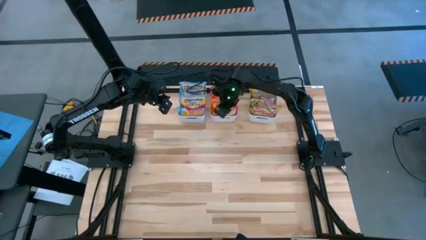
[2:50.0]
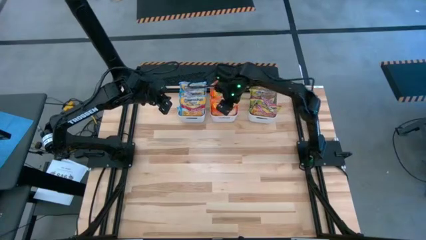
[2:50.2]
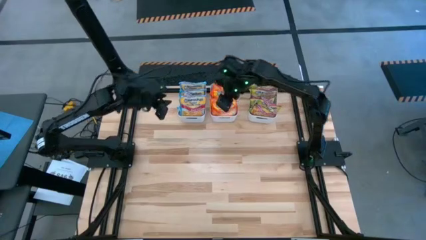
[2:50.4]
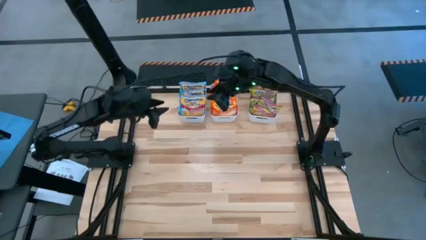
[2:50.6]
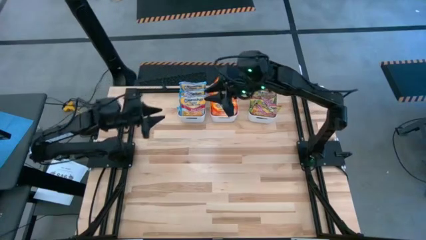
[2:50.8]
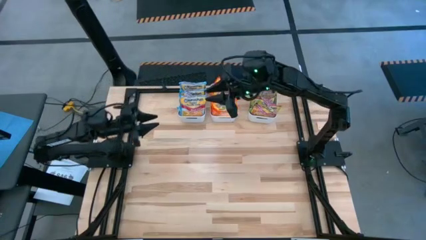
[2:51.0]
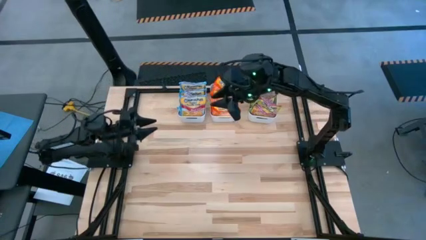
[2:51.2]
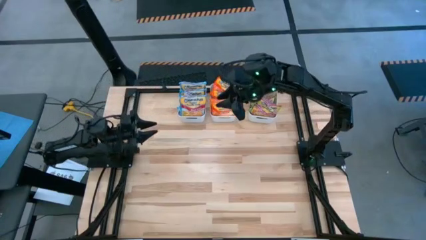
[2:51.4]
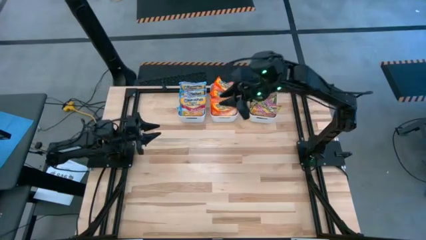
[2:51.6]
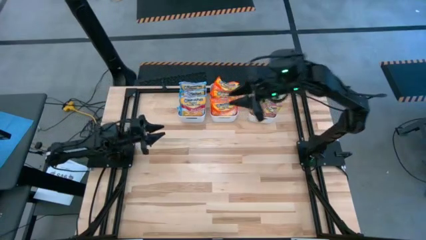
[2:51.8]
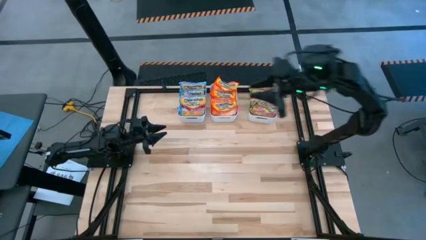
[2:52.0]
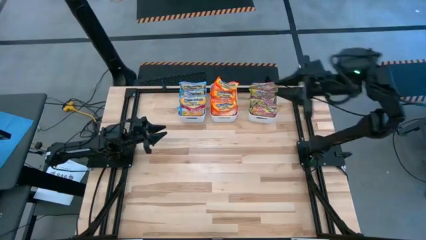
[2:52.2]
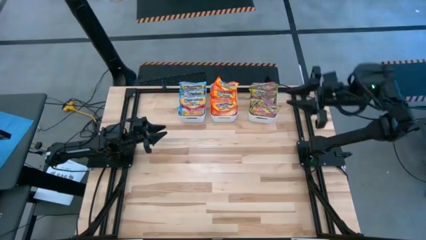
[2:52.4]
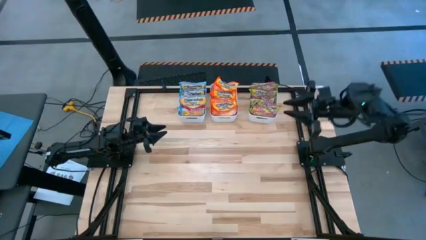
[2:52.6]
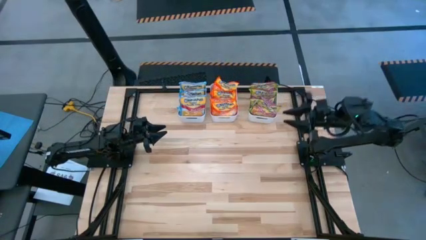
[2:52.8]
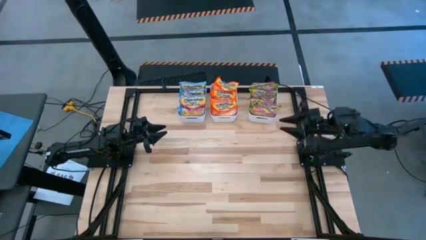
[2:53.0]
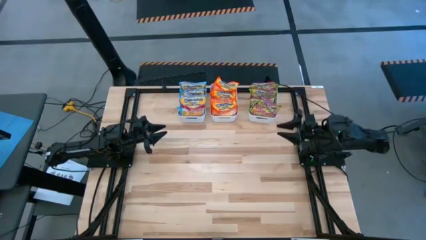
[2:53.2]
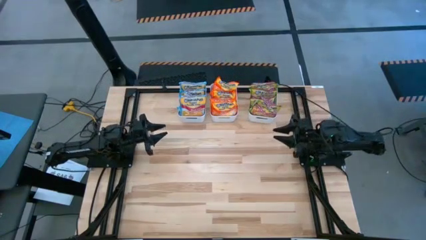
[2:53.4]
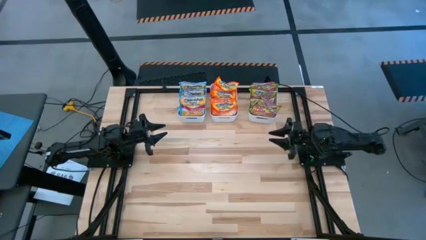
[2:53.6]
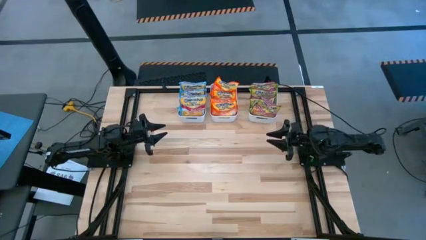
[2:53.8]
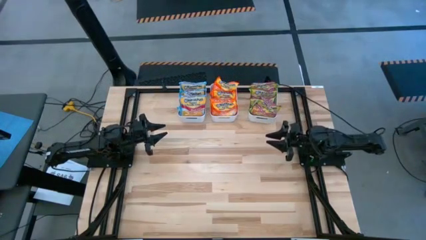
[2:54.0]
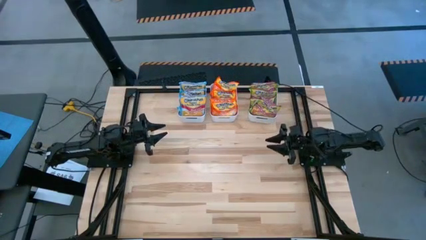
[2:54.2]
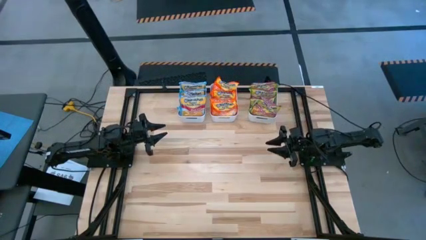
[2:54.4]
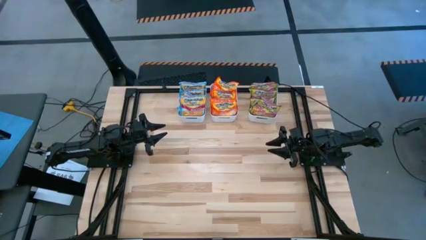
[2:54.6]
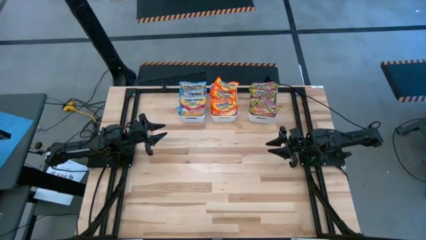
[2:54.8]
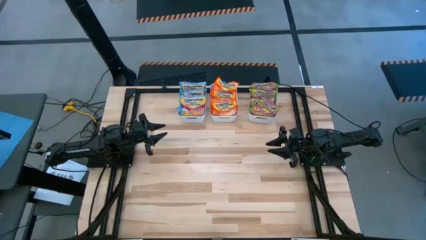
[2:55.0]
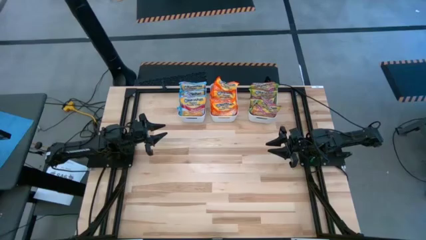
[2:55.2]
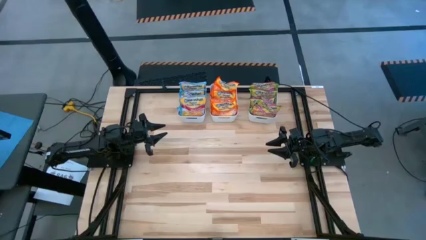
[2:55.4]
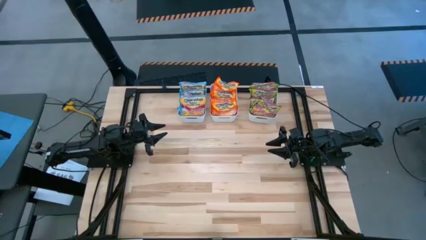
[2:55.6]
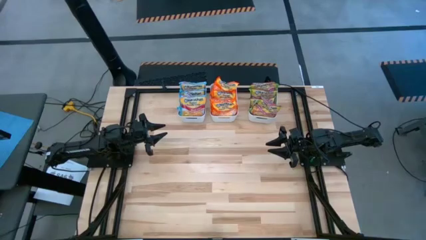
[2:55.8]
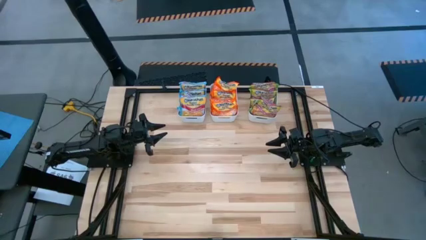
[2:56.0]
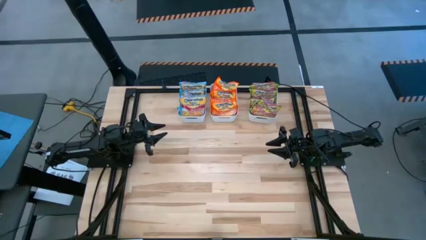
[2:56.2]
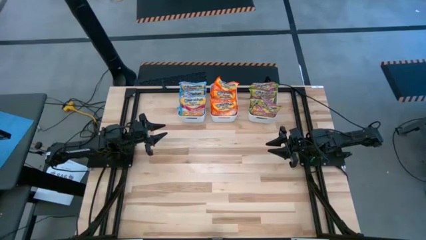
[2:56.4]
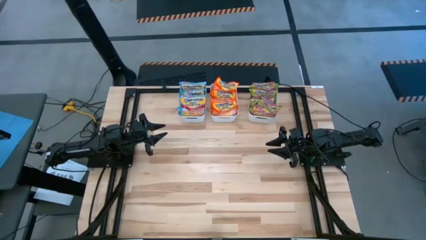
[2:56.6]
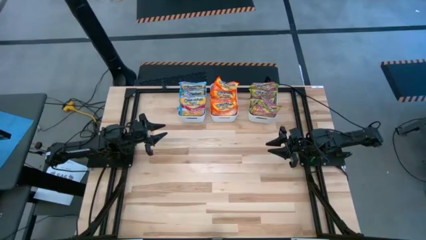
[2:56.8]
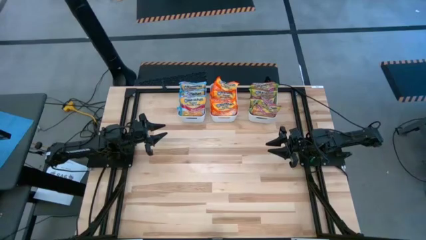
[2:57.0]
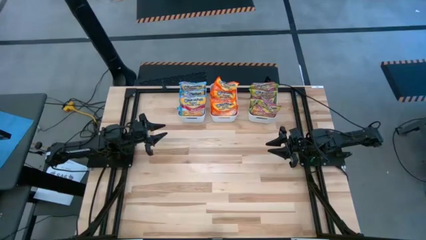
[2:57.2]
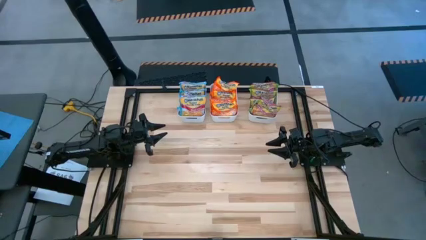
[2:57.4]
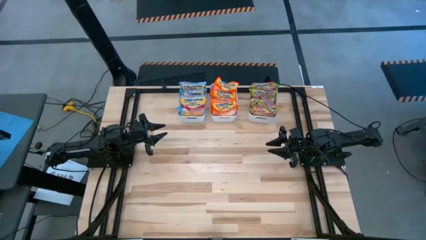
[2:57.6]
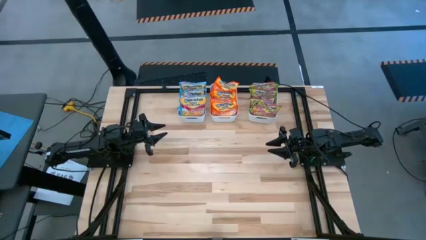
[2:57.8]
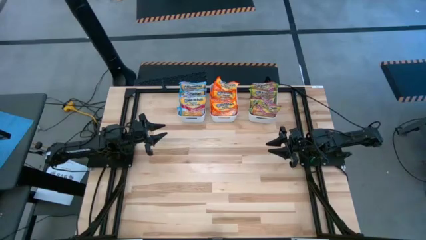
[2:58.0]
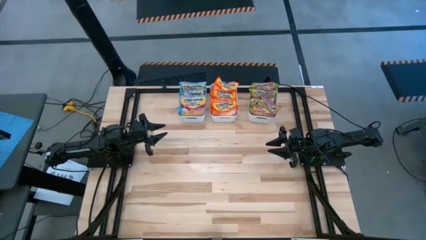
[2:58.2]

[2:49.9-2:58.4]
Task: Sort Maruchan noodles
Return to Home Position

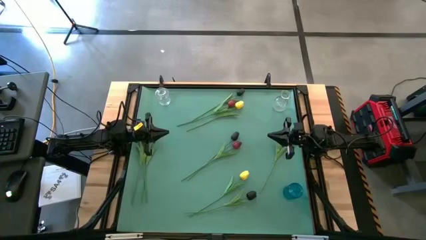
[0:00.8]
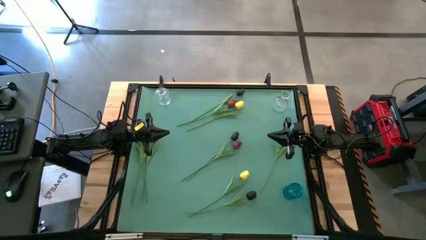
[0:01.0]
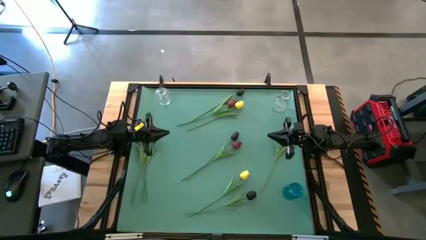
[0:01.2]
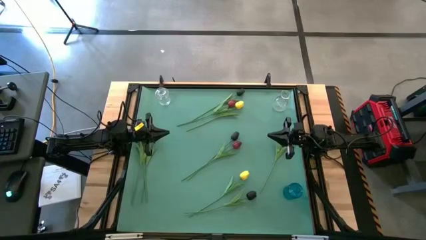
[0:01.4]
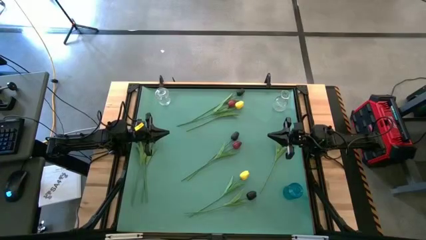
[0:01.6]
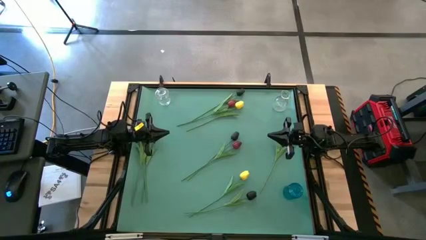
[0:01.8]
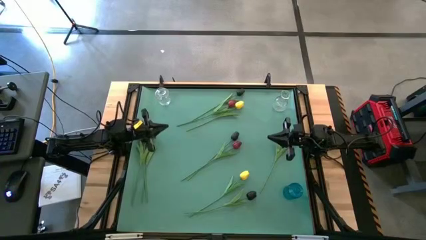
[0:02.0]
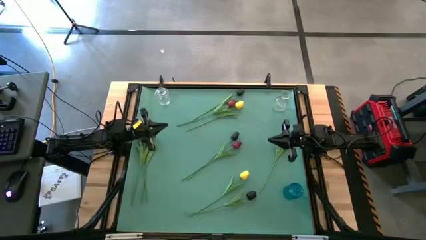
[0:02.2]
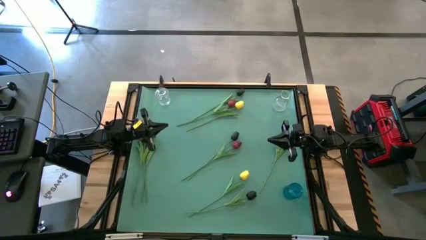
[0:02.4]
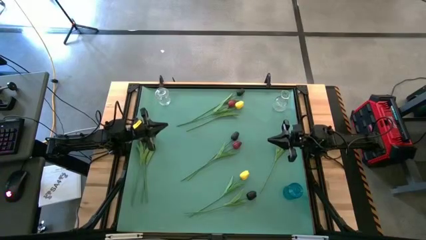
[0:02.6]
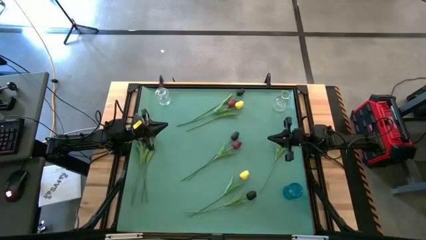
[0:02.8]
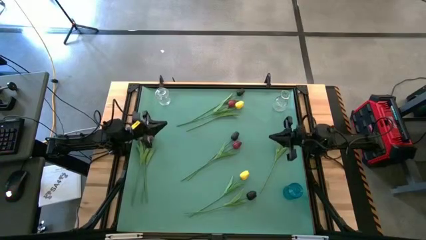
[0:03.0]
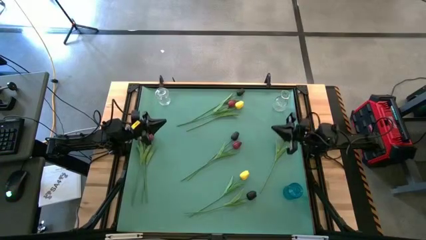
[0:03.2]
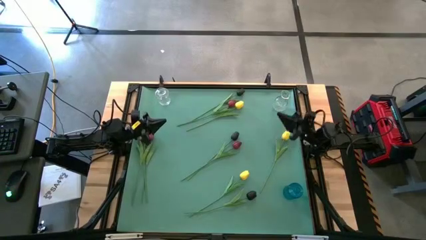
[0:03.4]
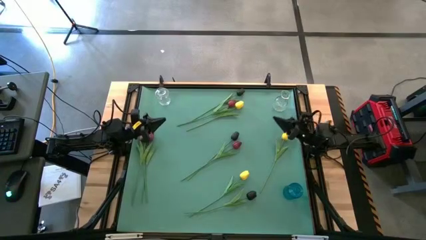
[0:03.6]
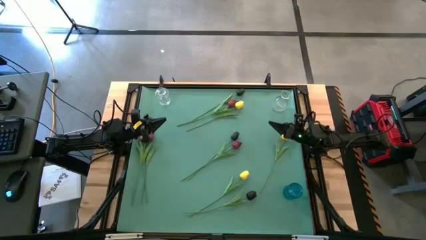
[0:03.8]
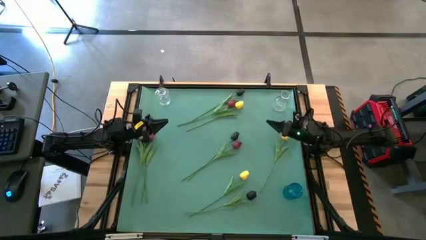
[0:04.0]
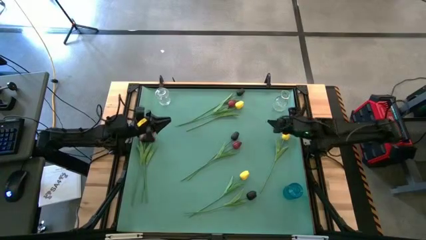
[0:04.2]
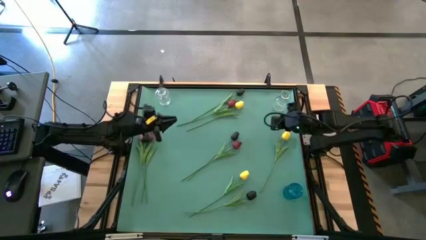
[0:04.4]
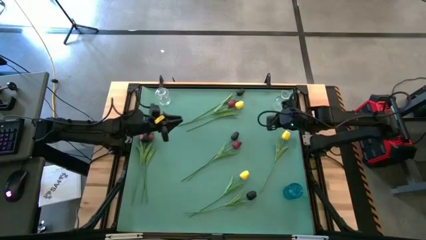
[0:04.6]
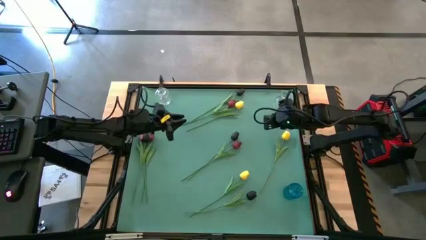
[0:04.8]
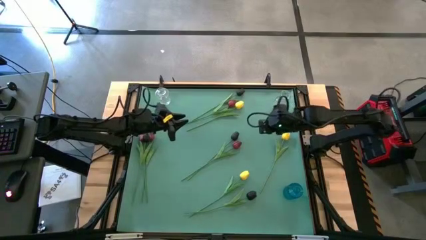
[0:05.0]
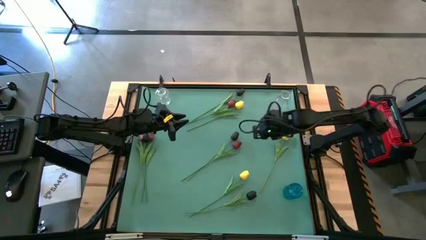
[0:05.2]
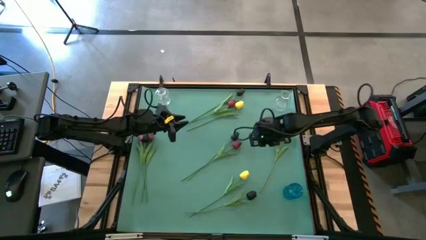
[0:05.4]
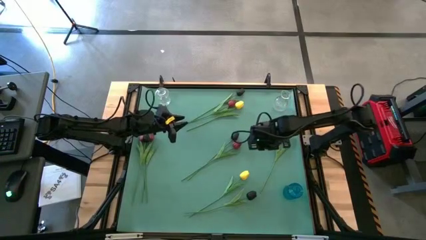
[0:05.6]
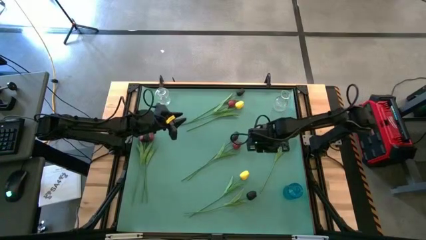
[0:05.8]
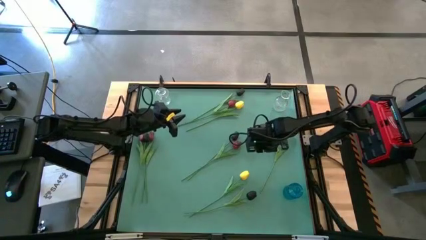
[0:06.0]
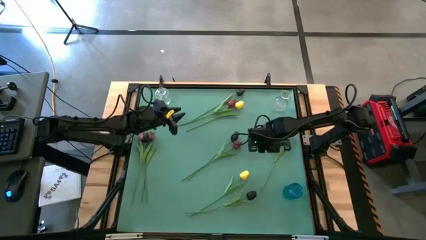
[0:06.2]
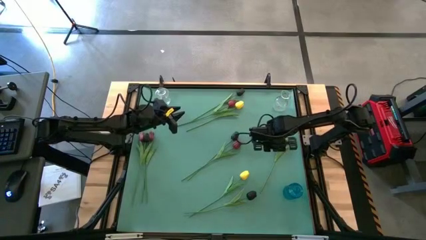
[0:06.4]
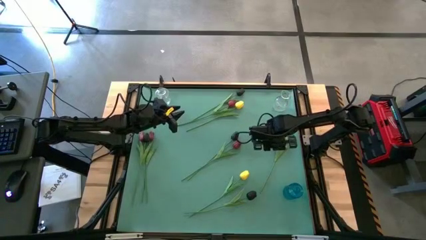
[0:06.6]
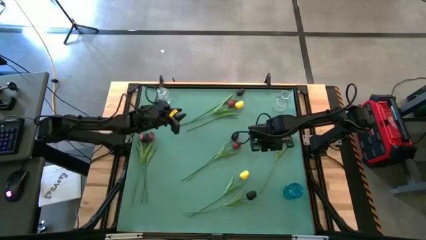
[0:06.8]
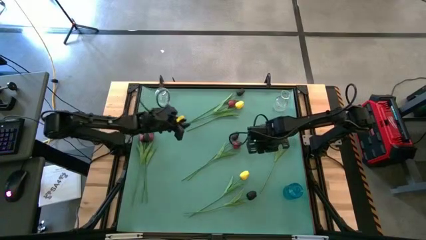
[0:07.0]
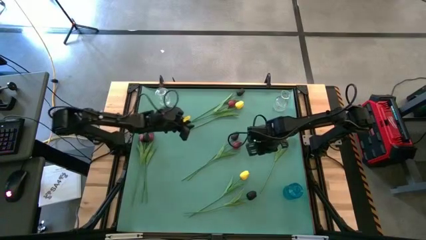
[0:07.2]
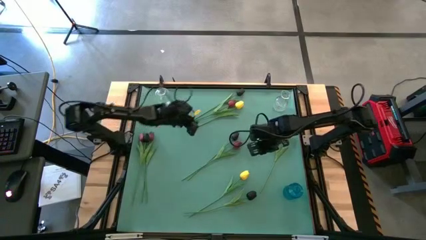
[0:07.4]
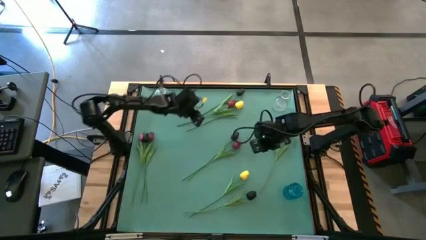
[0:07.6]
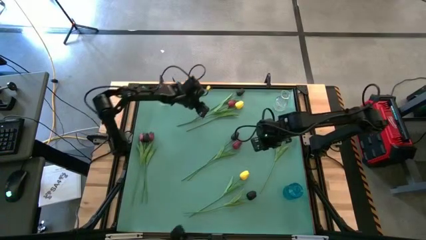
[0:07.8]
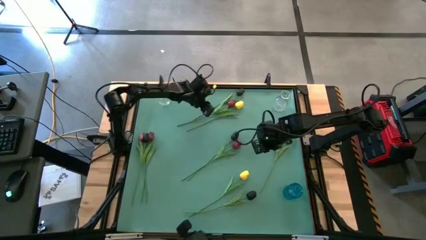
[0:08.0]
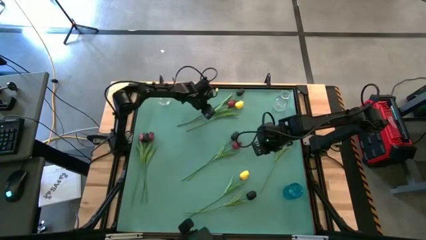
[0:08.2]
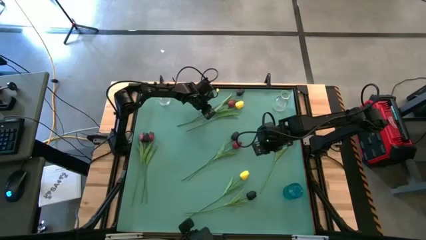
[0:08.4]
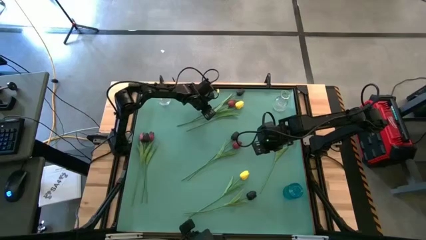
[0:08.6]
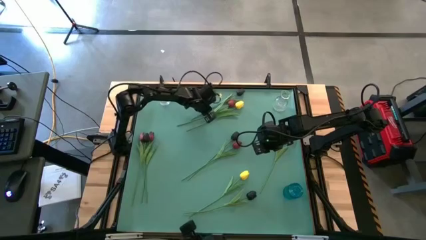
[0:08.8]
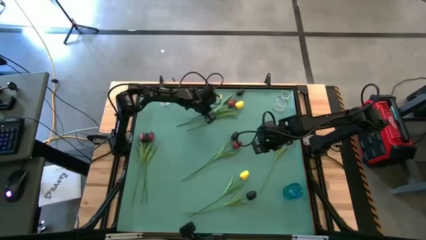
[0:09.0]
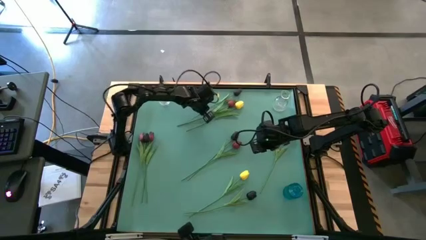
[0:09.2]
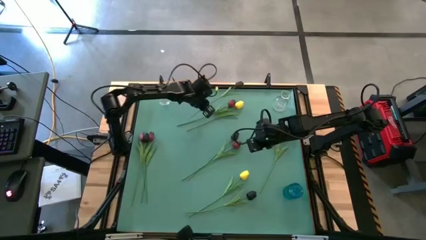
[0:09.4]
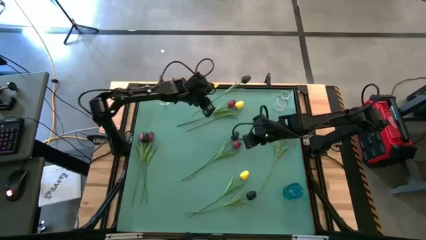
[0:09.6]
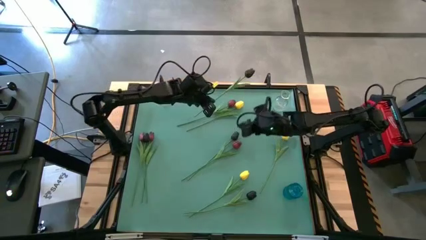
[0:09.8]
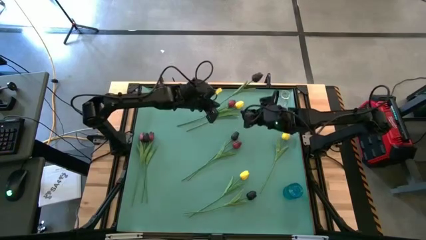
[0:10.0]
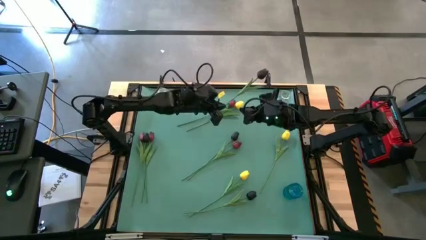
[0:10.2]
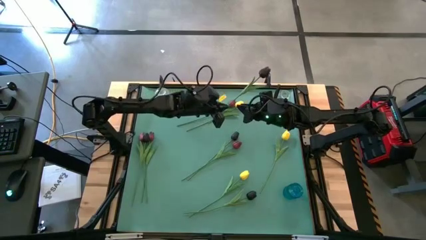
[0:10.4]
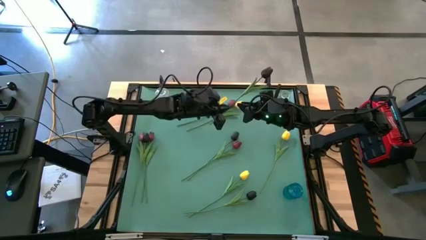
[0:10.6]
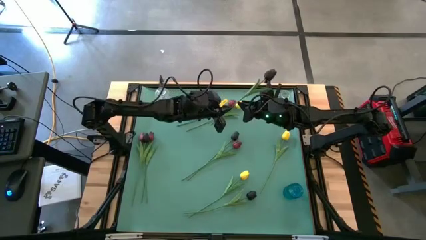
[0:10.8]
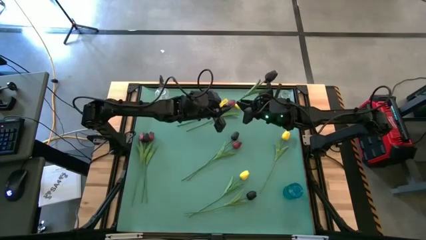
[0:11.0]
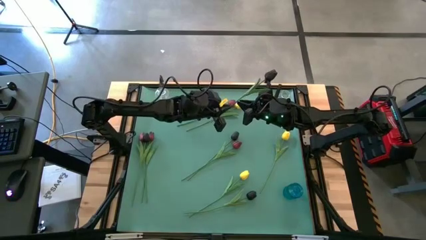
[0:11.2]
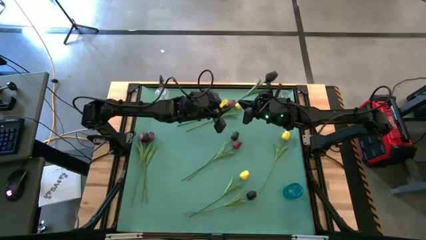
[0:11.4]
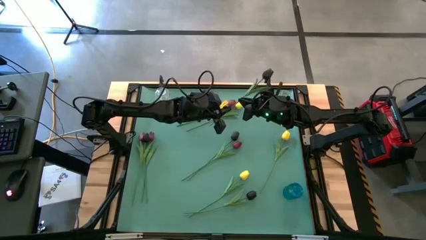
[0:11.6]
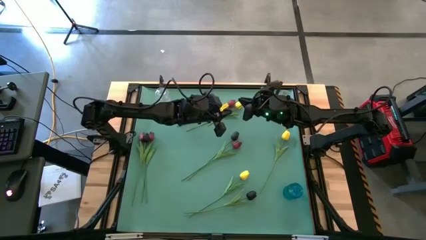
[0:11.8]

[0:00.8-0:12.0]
Task: Sort flowers into vase by color
Put the black flower into the left transparent vase
